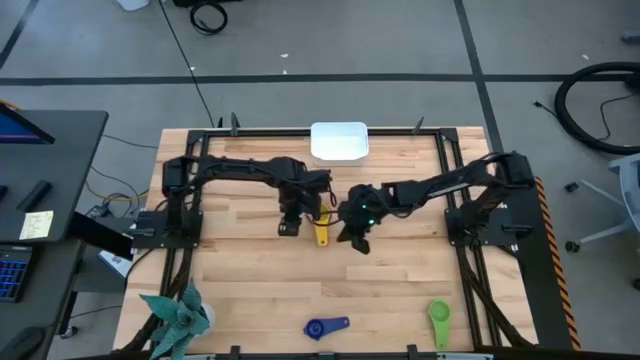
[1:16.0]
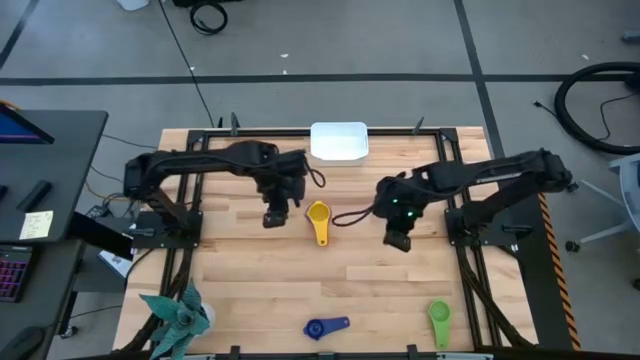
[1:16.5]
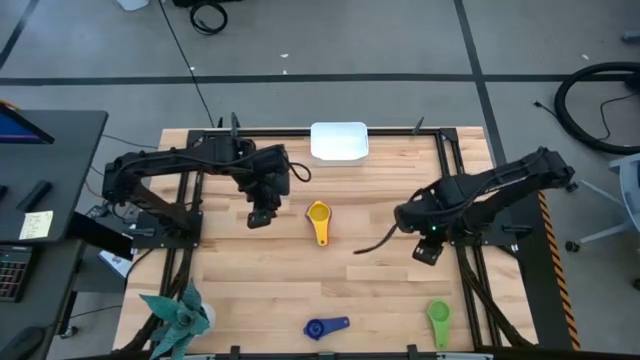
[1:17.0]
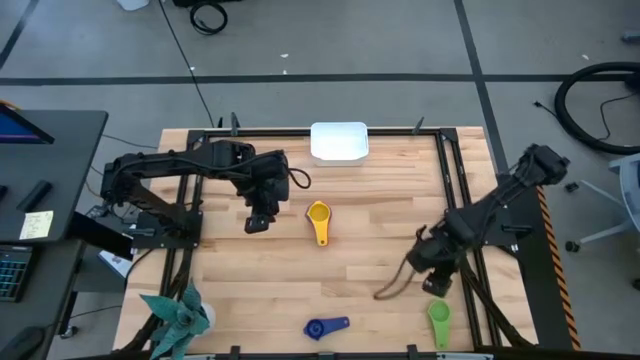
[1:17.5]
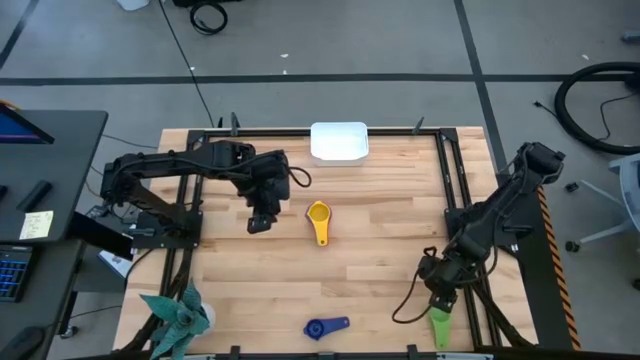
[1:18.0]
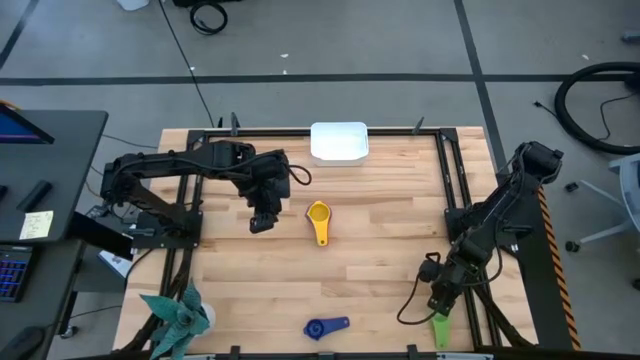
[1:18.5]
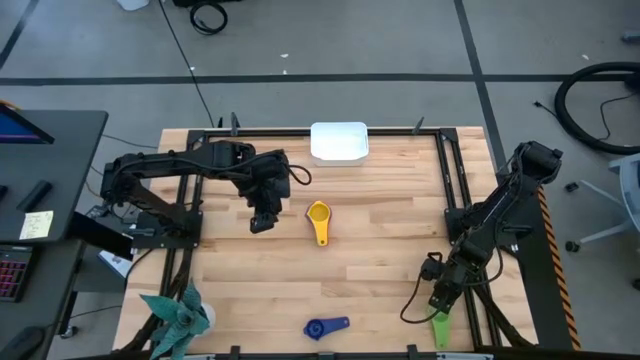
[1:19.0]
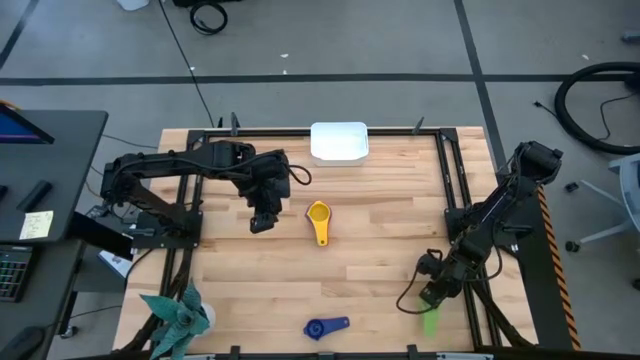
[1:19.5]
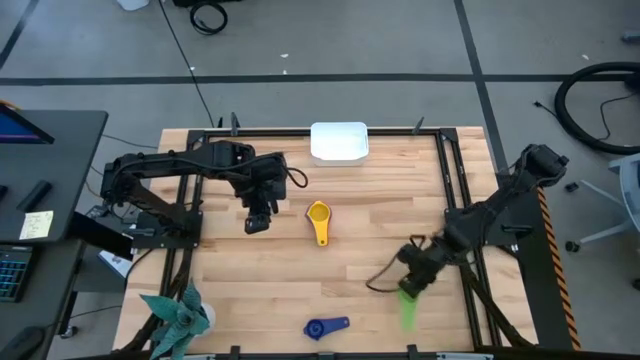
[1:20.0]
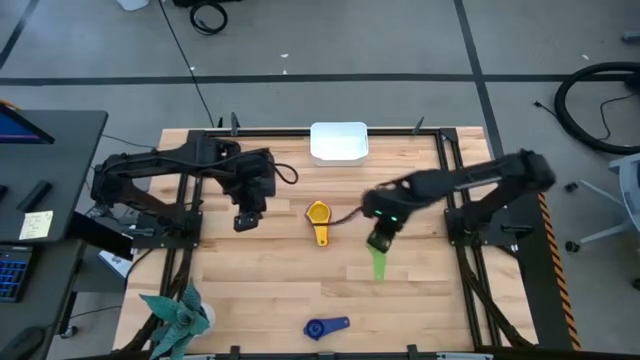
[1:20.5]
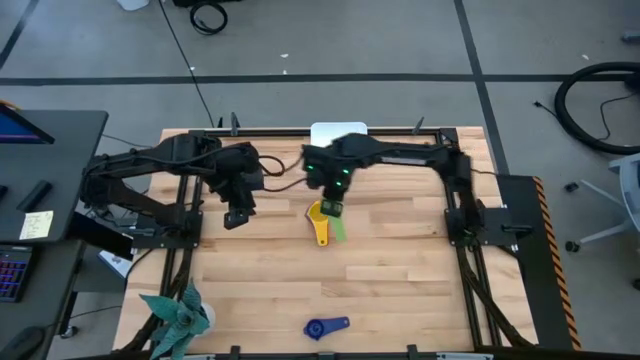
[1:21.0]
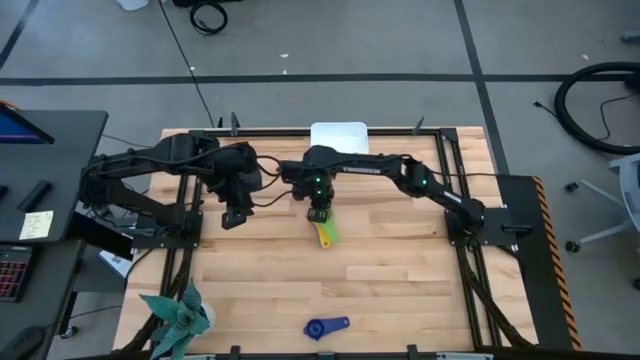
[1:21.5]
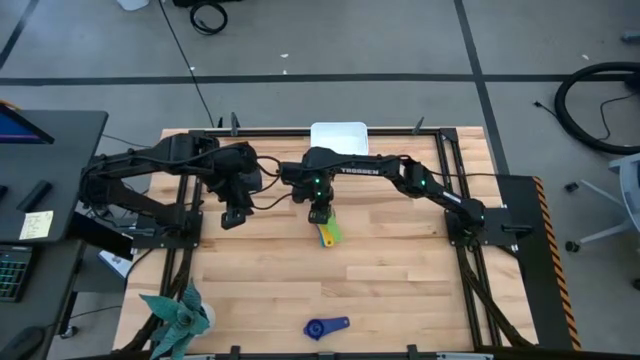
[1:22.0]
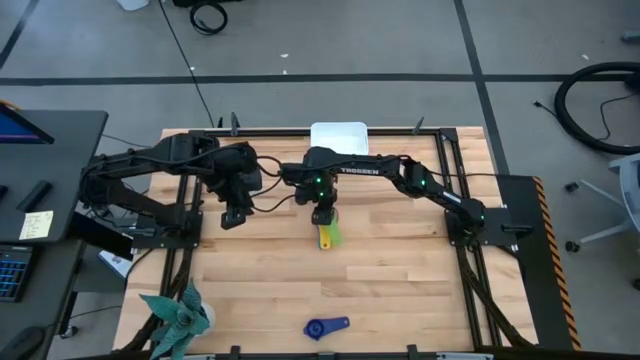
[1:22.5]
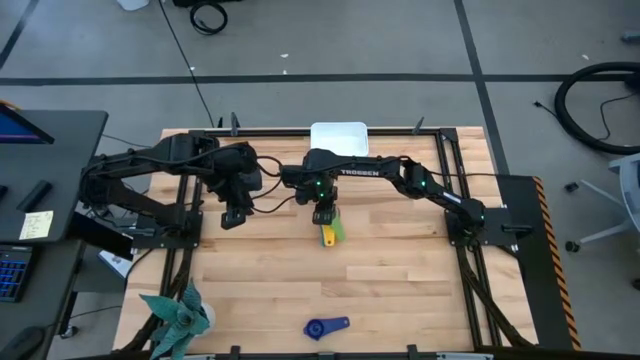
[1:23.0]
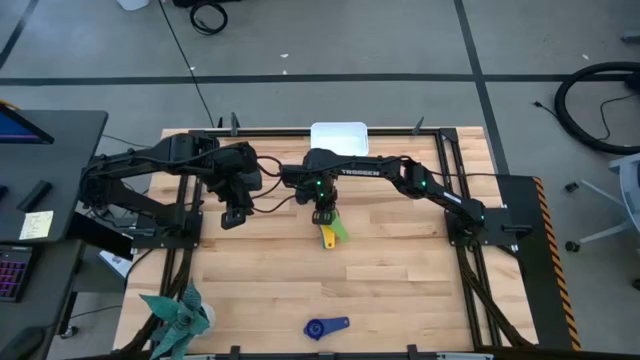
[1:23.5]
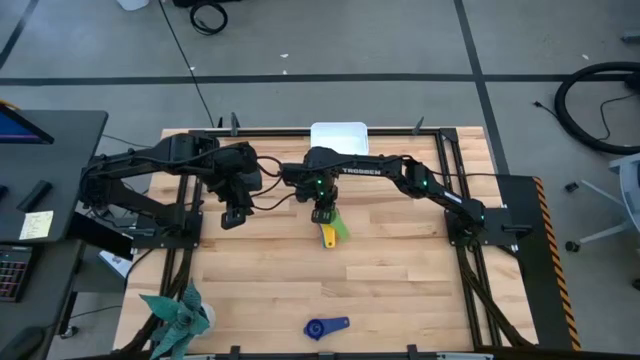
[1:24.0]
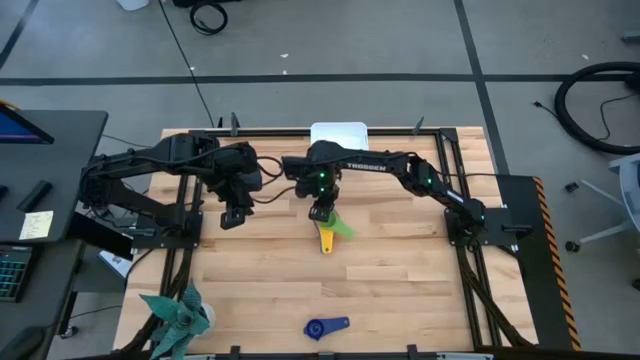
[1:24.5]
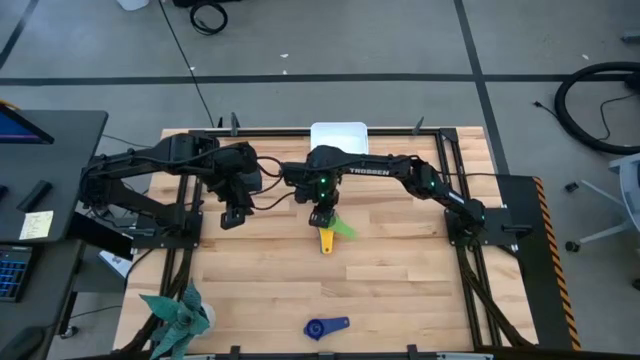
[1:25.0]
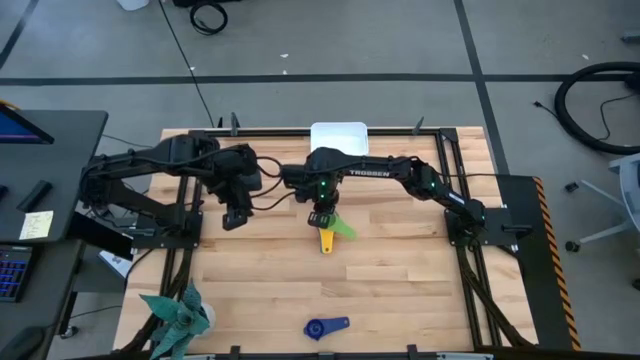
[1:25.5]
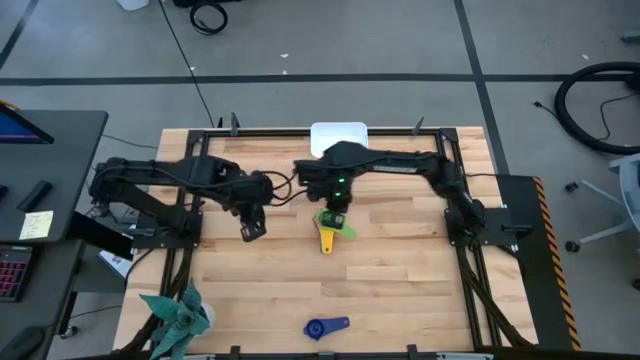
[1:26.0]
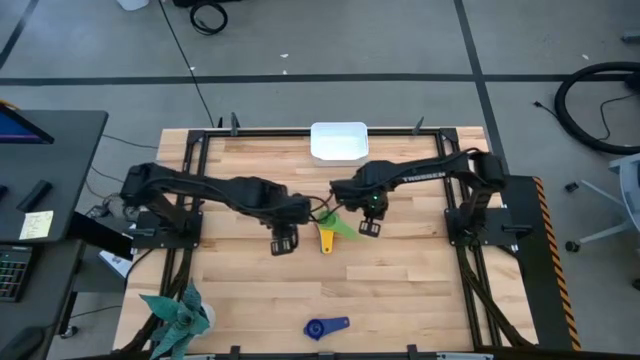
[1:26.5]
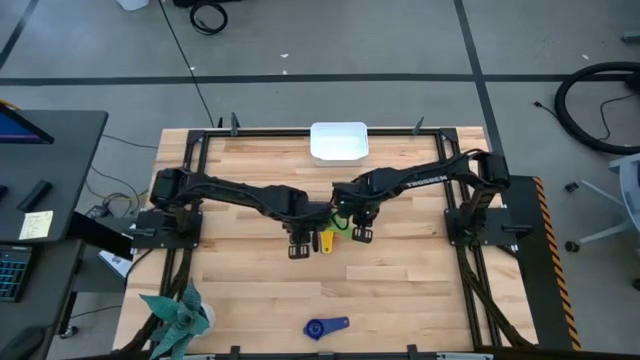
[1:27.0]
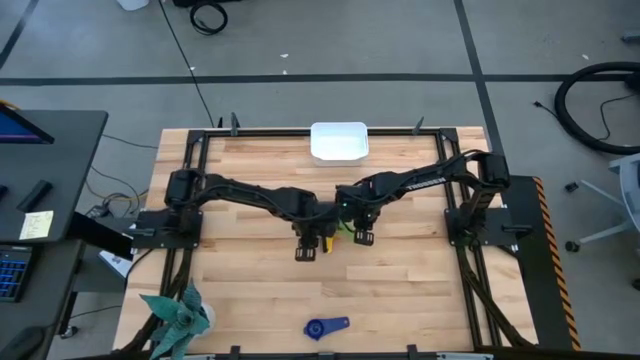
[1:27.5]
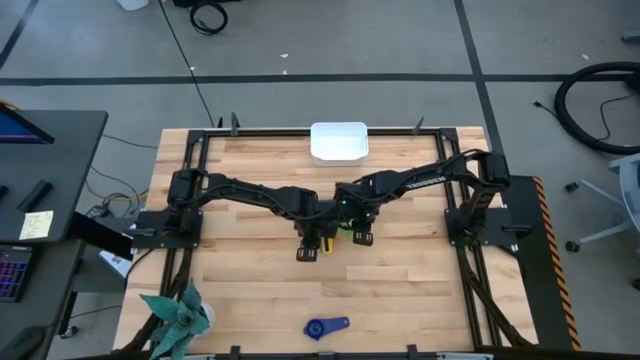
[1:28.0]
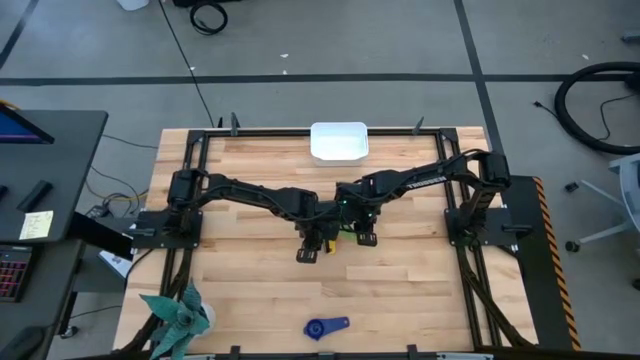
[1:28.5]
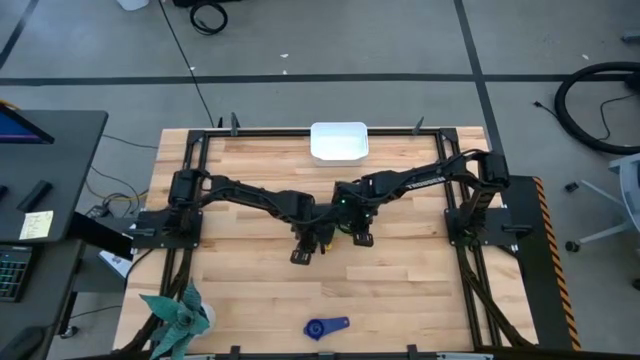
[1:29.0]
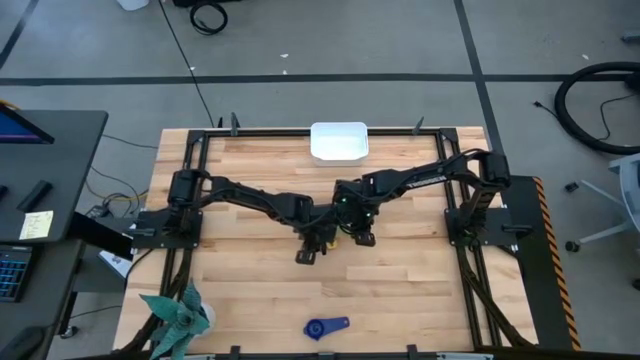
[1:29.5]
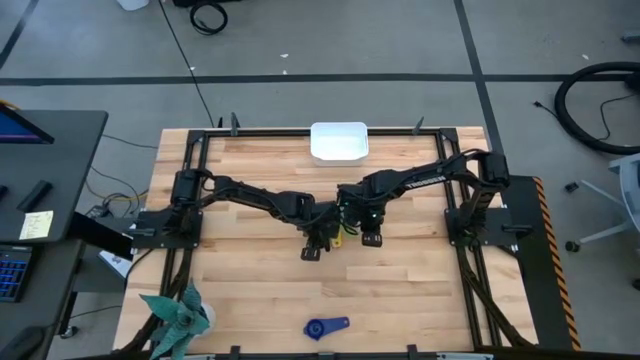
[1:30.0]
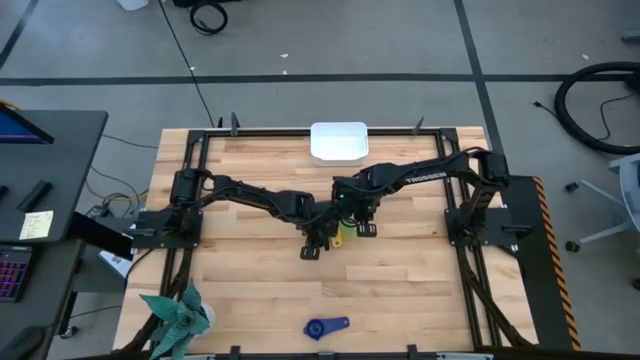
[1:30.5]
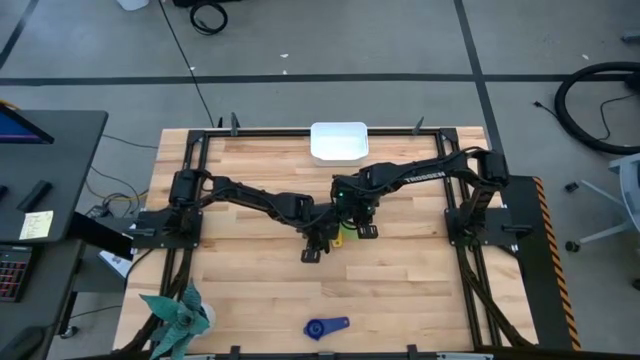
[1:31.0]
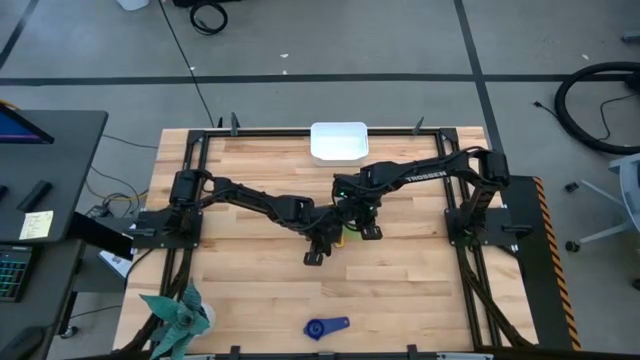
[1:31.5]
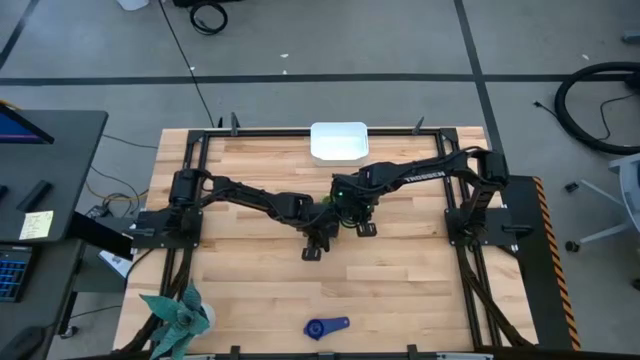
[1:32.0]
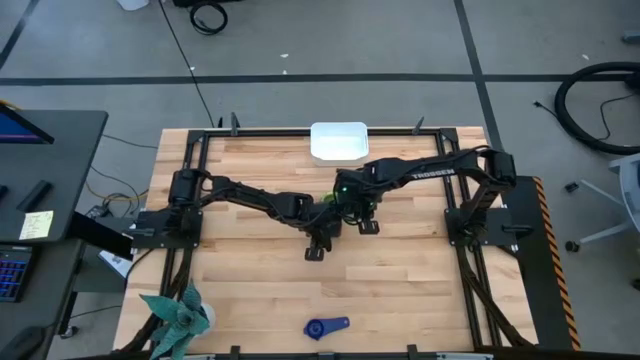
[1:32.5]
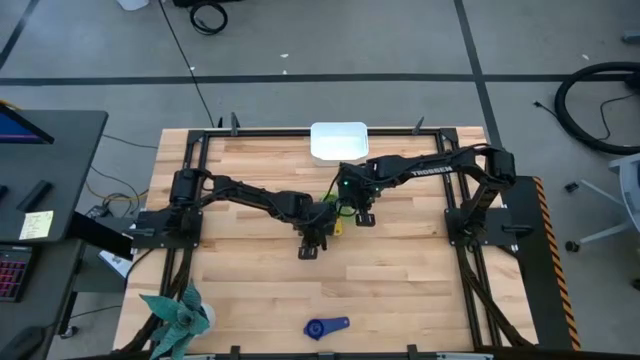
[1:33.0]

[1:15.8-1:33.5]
Task: Nest measuring cups in basket
Stack the green measuring cup on the yellow measuring cup

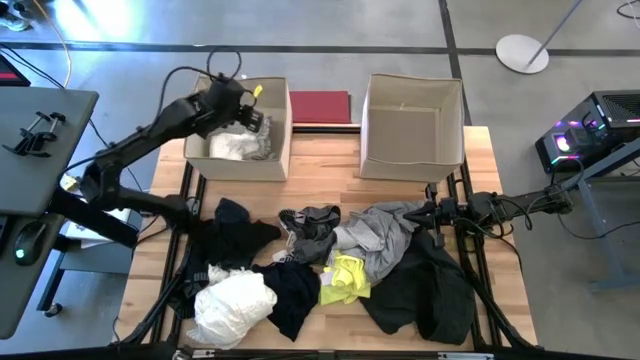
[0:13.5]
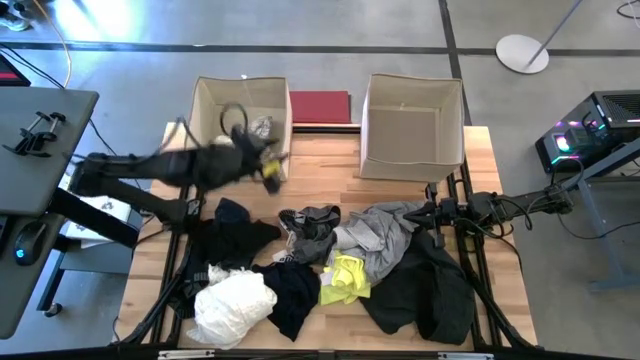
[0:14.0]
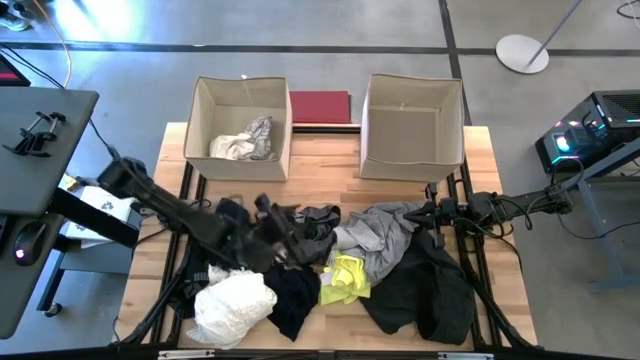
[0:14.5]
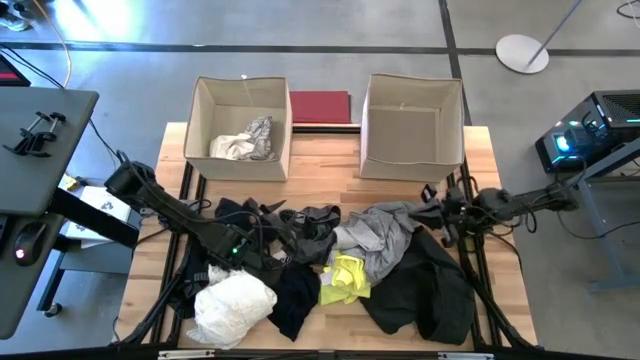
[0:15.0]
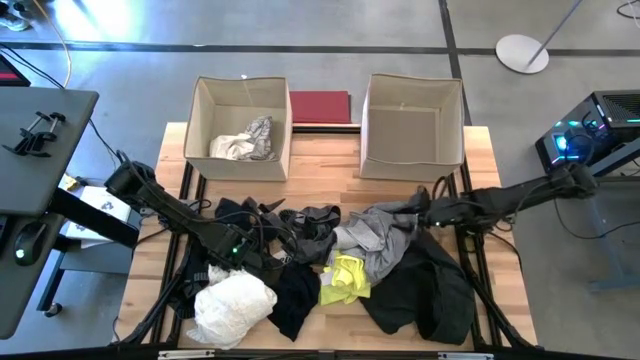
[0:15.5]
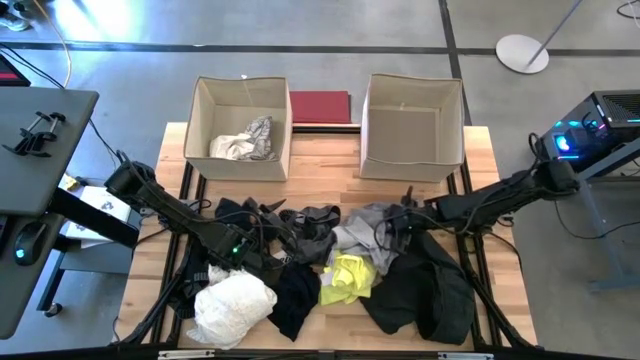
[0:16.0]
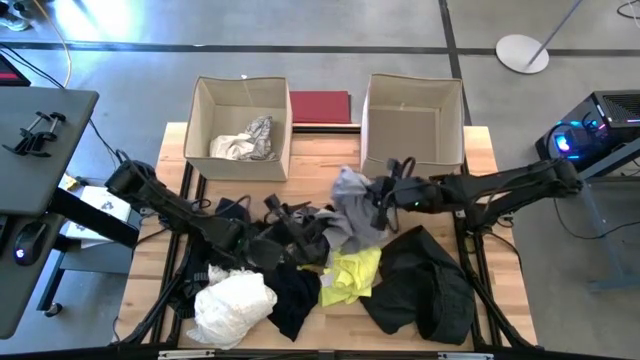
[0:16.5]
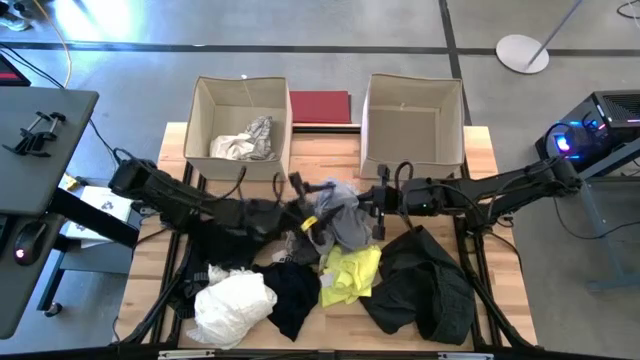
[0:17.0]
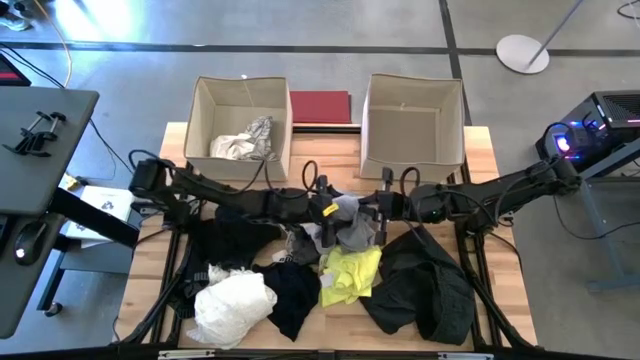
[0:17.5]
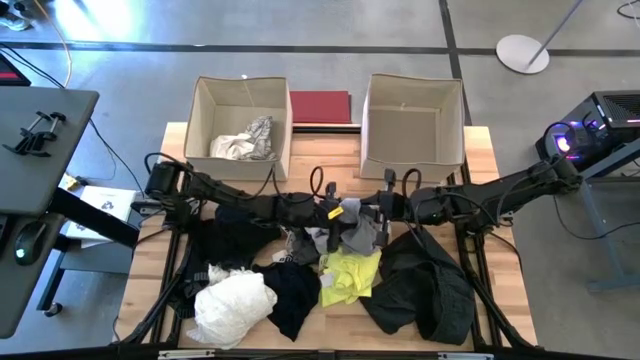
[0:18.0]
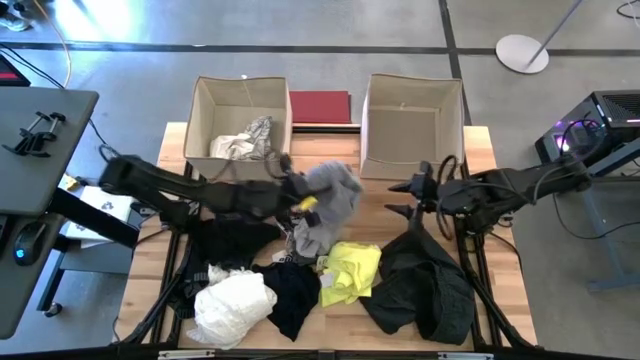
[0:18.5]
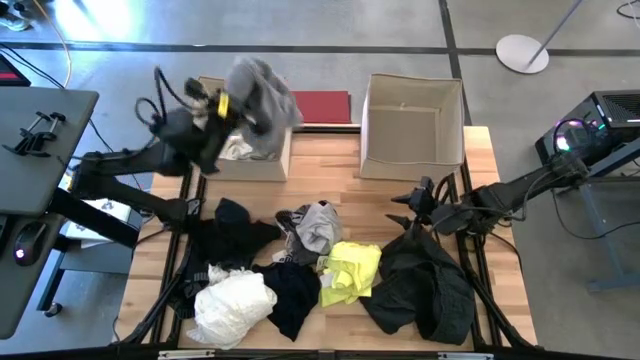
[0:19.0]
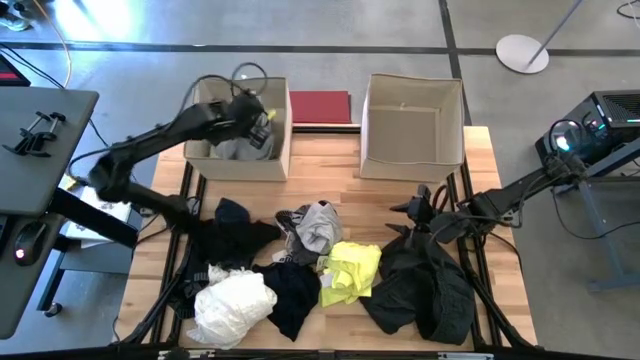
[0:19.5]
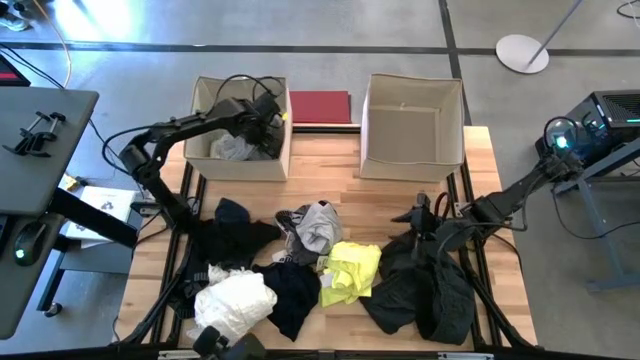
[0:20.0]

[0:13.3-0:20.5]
Task: Sort clothes
Put the grey pants into the left brown laundry organizer
